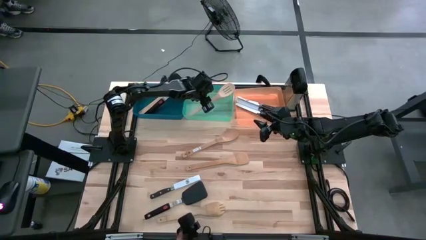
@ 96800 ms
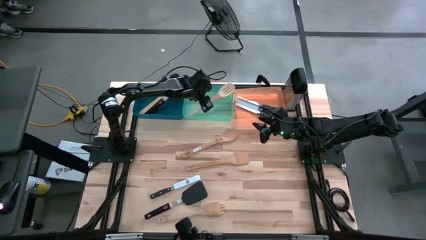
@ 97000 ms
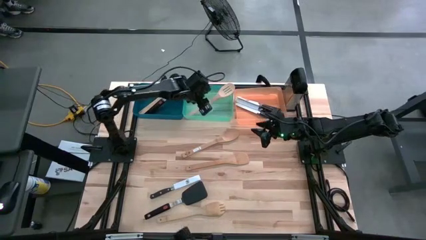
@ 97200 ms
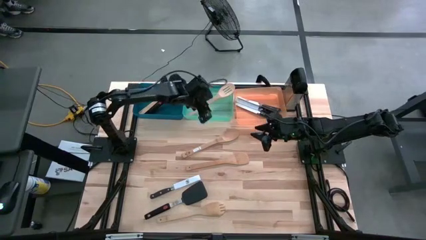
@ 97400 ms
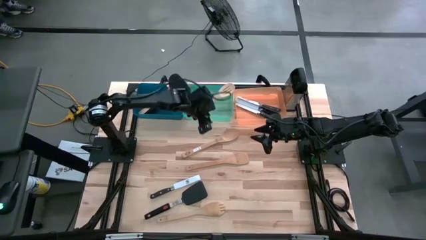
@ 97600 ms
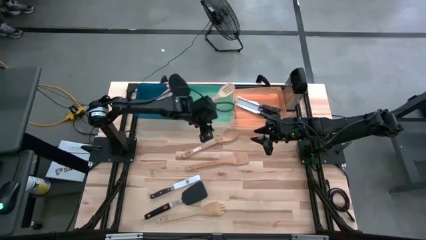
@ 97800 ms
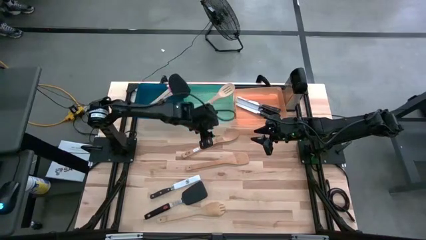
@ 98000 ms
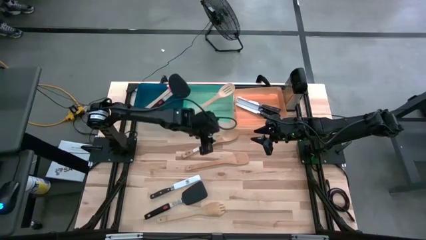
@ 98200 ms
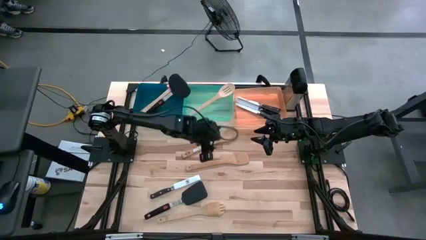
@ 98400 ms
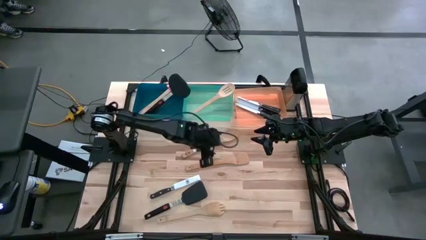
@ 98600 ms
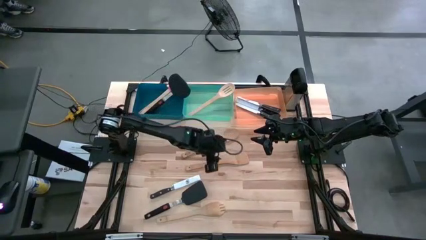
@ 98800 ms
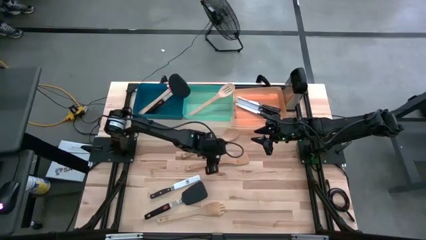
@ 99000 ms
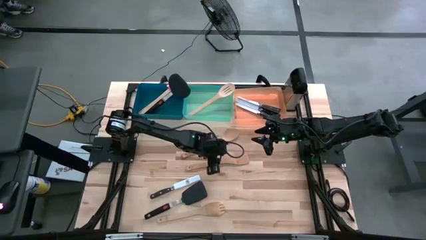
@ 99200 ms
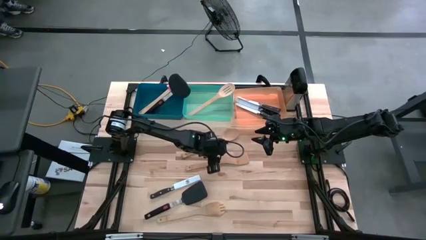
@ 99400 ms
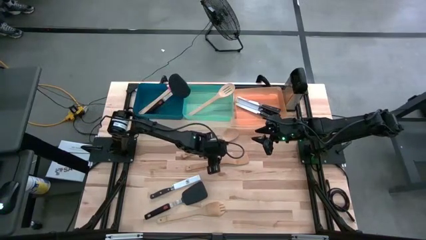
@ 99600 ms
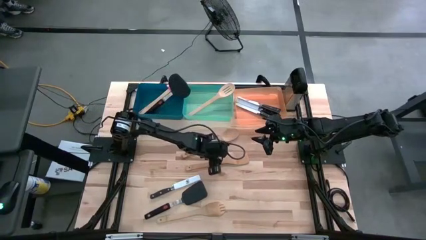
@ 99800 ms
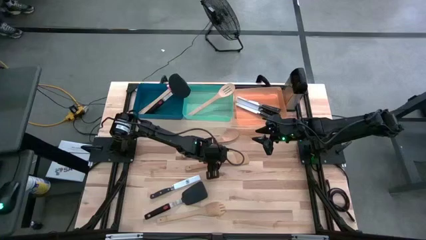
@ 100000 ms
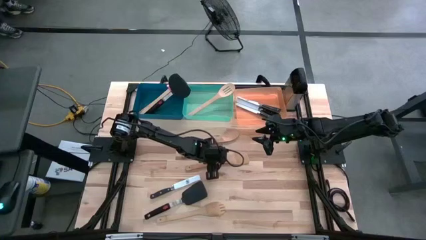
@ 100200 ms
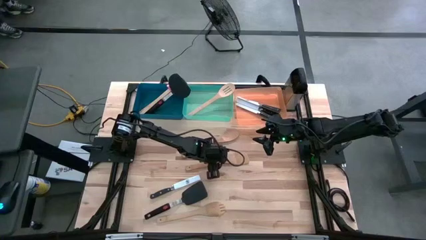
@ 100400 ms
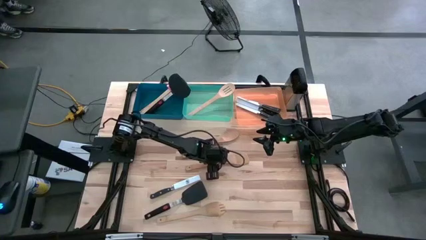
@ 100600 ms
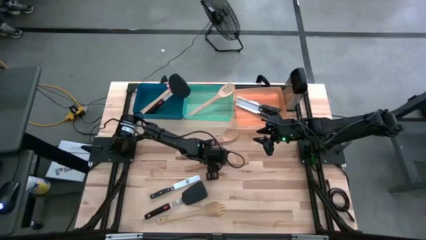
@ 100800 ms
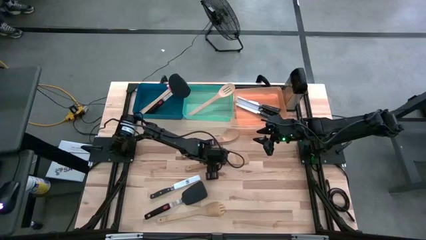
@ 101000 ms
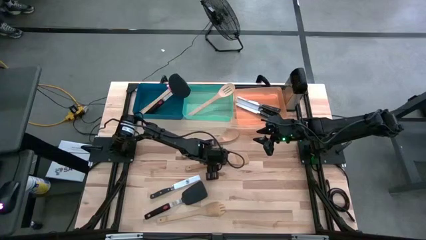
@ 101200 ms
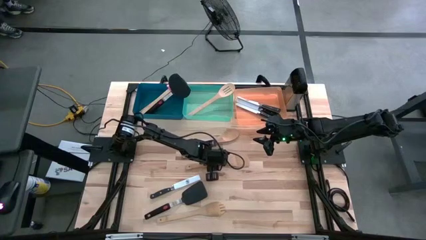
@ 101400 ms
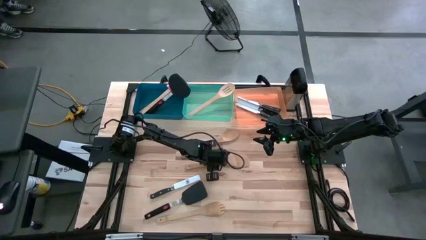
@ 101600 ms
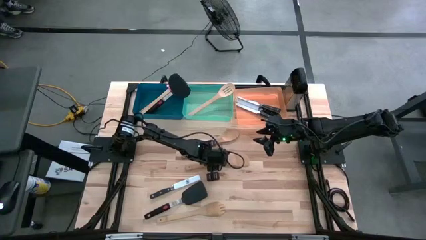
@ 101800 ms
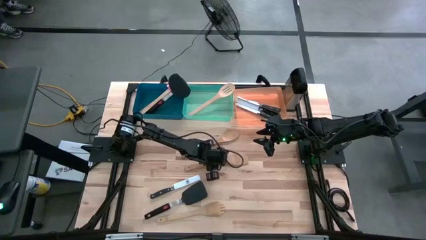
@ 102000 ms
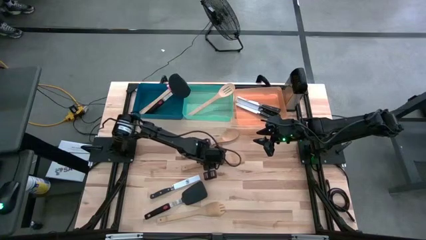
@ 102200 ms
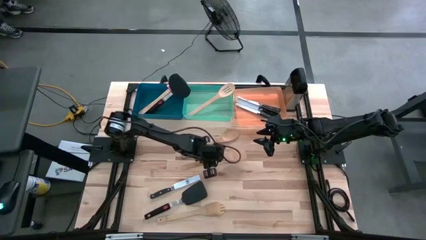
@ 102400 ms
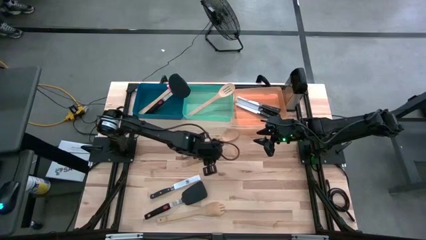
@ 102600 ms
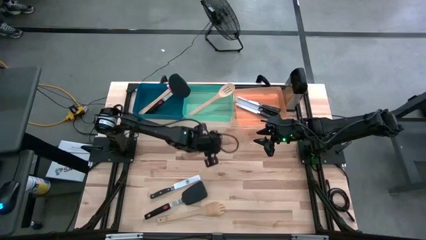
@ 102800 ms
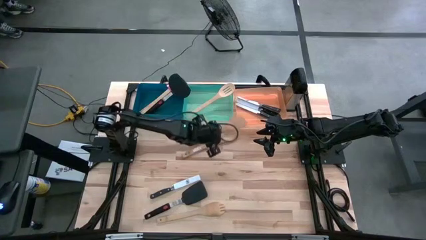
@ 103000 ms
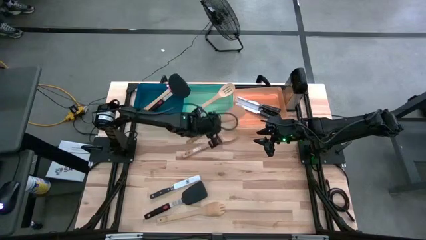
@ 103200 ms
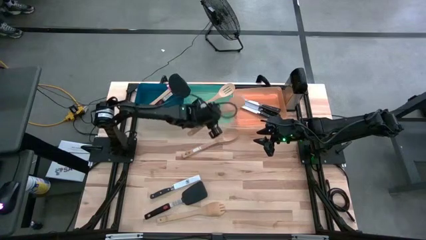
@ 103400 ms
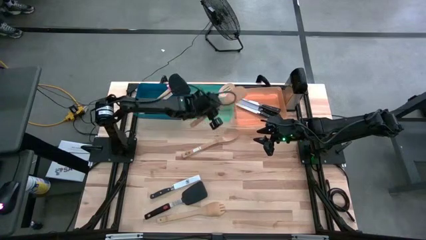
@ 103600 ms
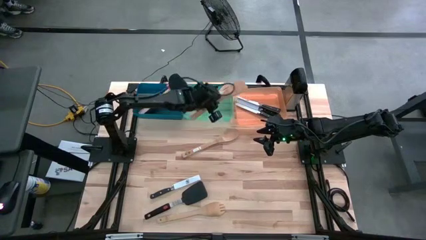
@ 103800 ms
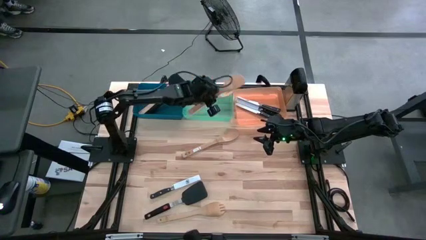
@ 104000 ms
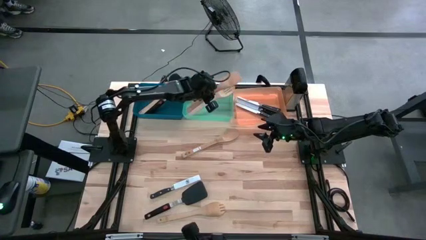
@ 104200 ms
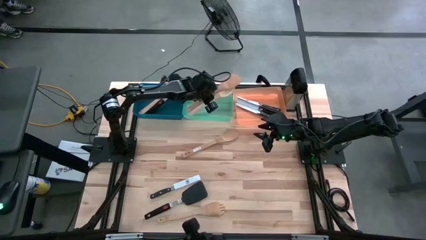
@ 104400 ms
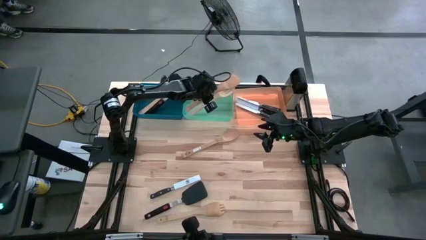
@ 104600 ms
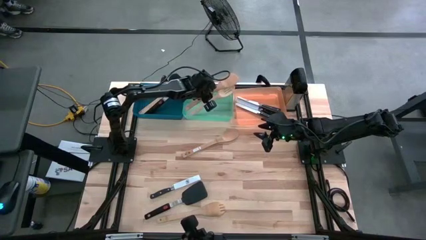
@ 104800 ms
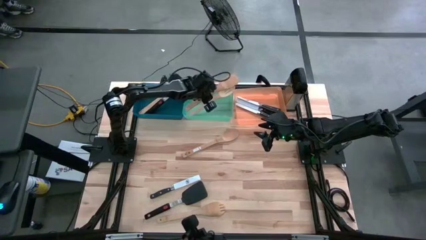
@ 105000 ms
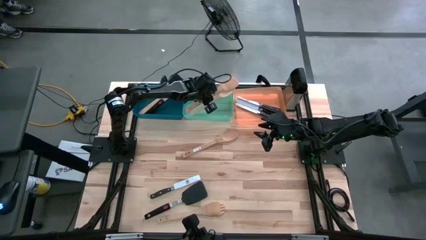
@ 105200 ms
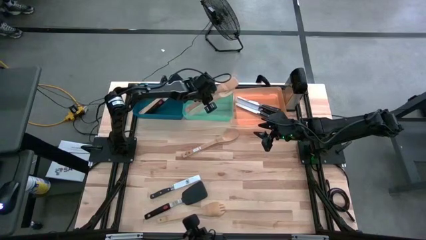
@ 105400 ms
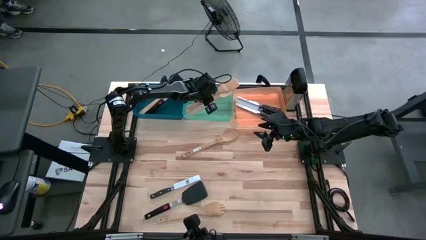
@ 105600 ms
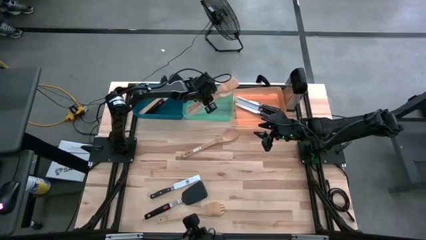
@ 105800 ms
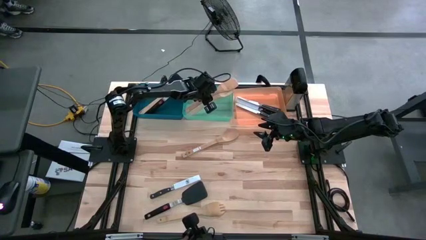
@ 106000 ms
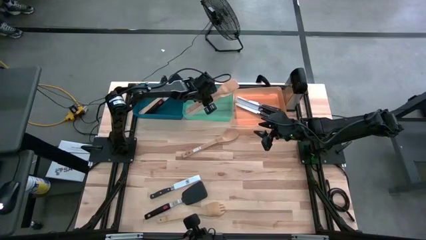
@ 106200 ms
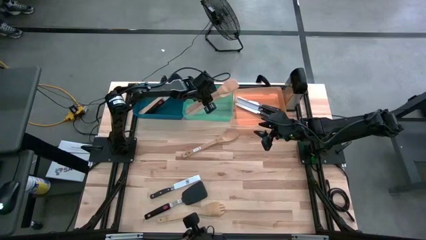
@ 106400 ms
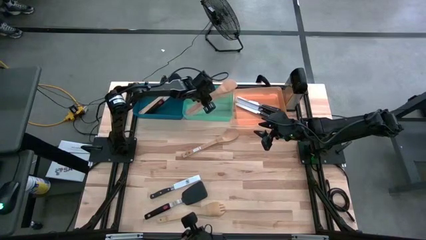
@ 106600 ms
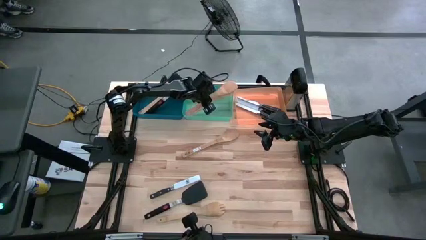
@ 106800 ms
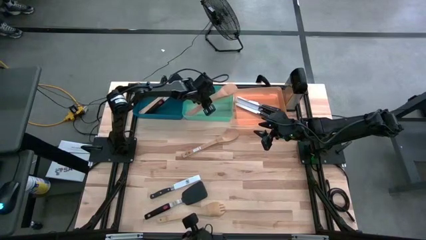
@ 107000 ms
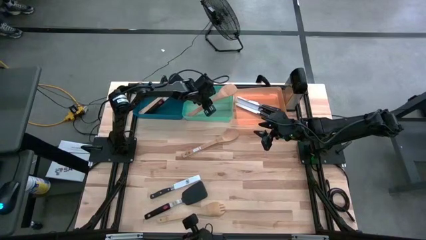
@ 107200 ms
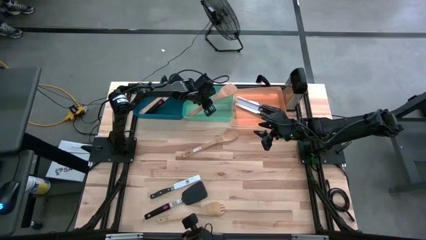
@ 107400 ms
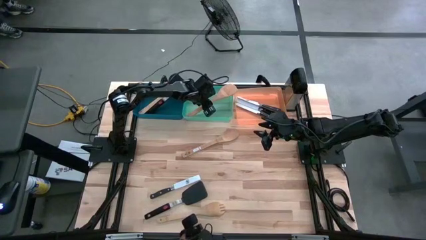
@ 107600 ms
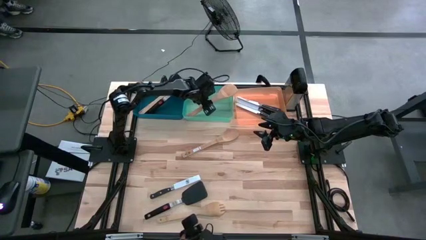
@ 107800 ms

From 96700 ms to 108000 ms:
Task: Pick & Place Kitchen Items
Put the serving spoon into the green bin
